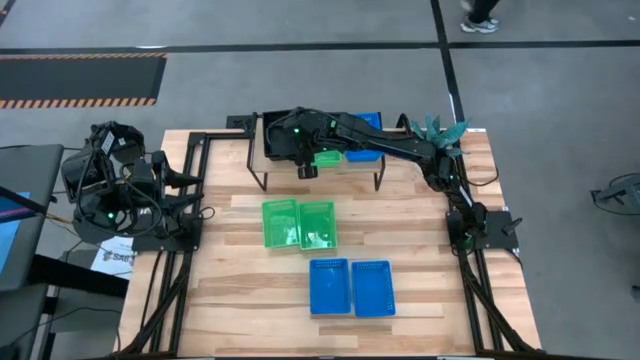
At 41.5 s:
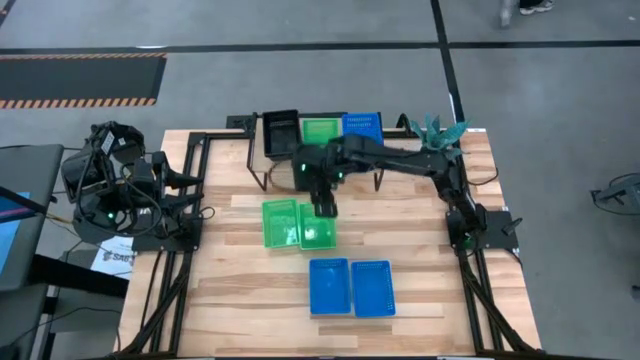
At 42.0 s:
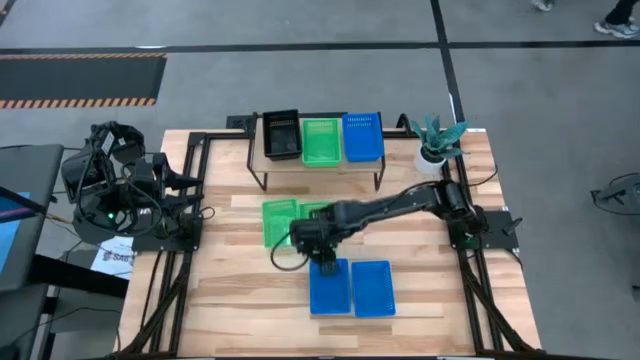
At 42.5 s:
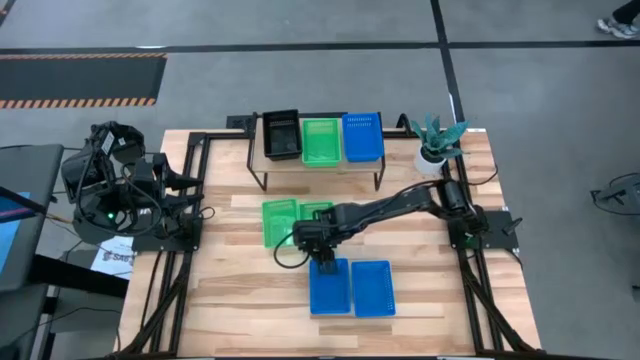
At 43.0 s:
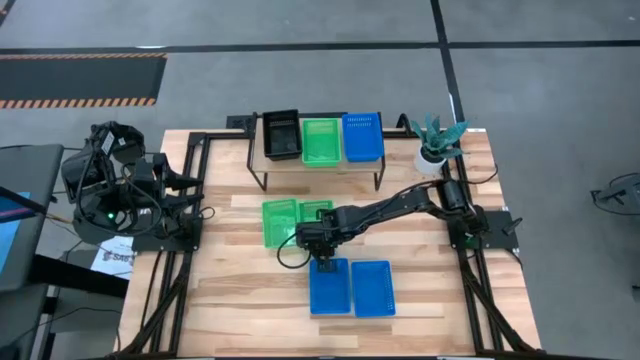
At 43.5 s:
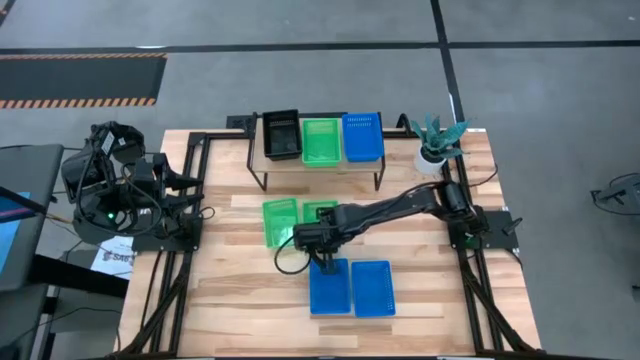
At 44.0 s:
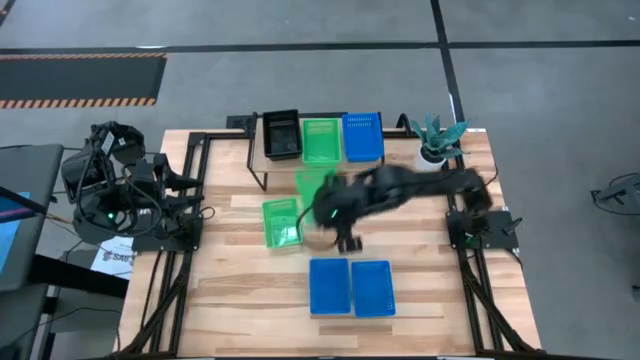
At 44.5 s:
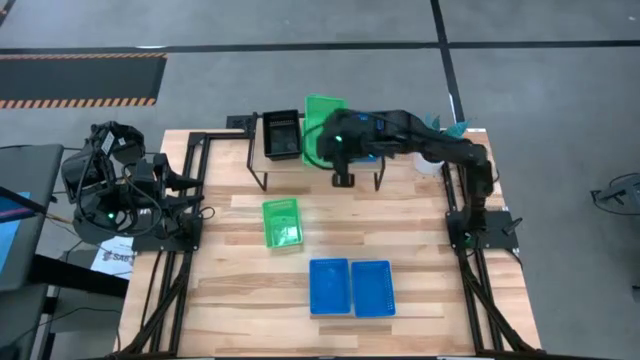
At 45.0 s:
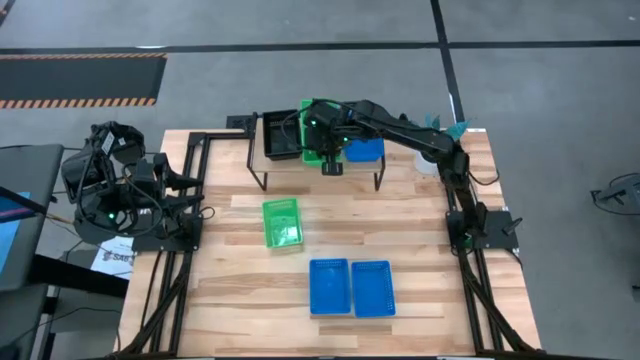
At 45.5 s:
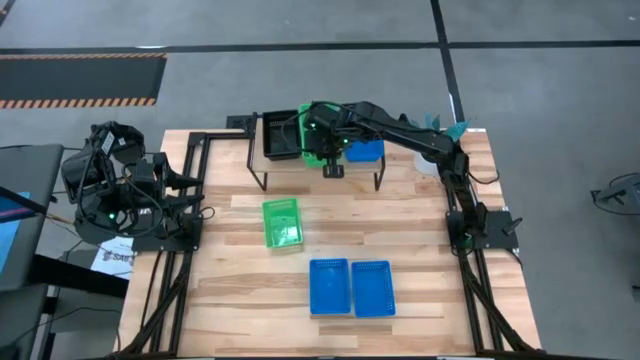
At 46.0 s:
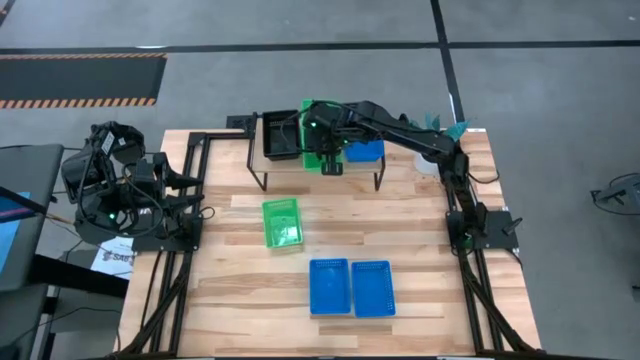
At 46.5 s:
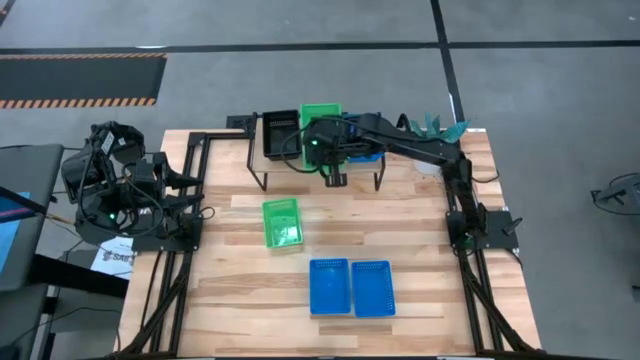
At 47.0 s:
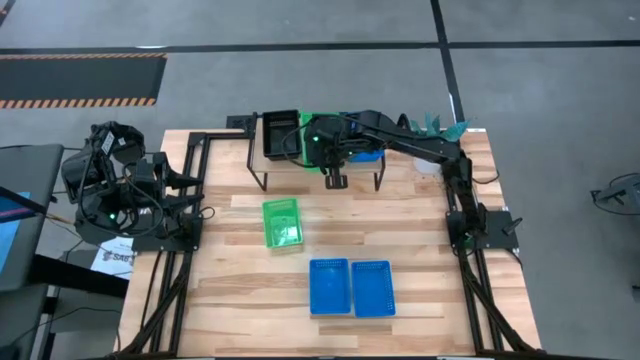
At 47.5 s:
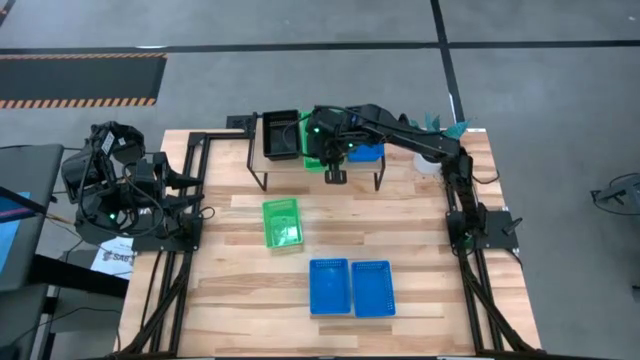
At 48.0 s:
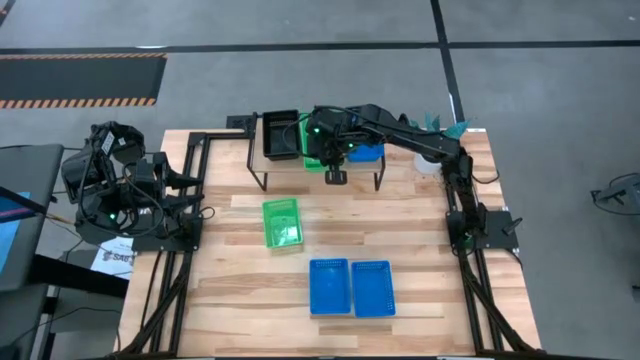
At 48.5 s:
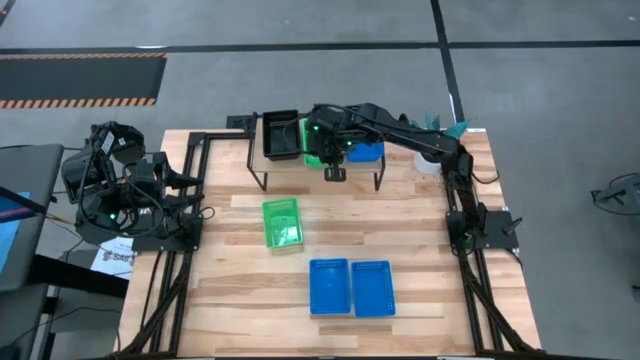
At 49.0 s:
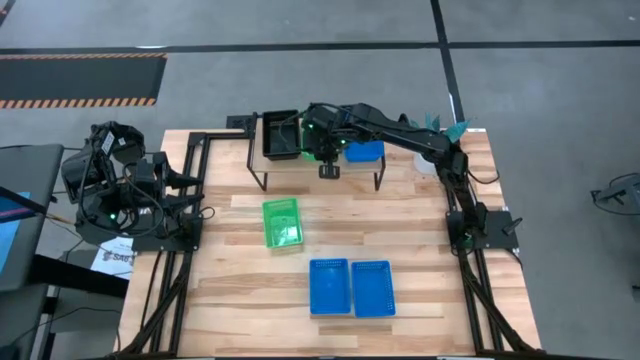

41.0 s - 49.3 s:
Task: Stack baskets on shelf by color
Stack the right green bin on the green bin on the shelf

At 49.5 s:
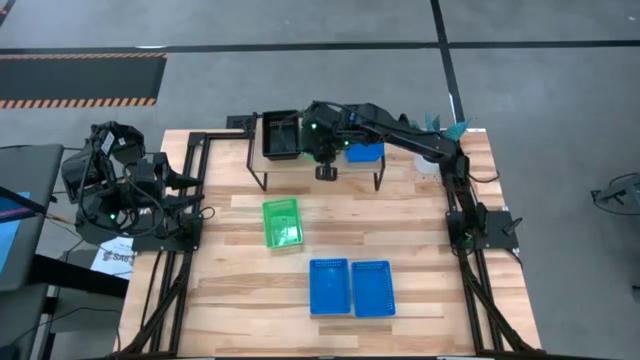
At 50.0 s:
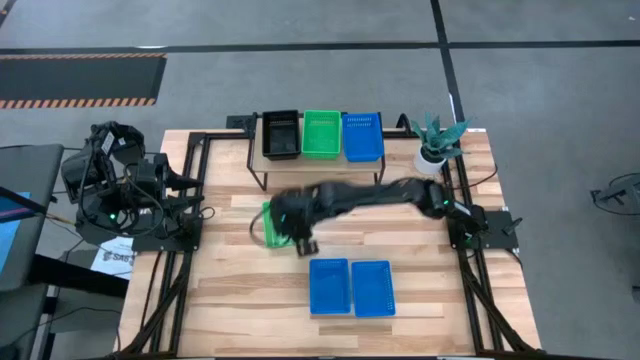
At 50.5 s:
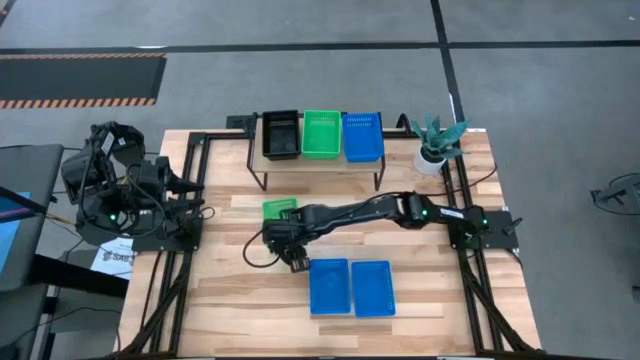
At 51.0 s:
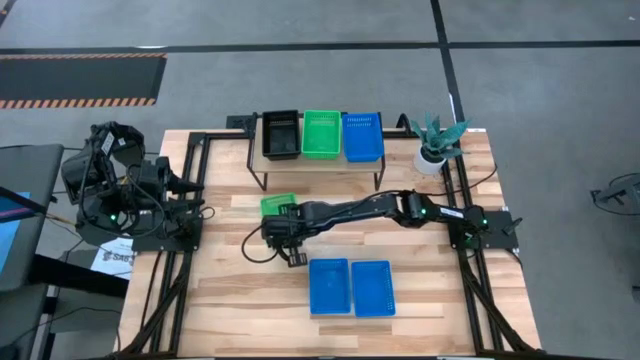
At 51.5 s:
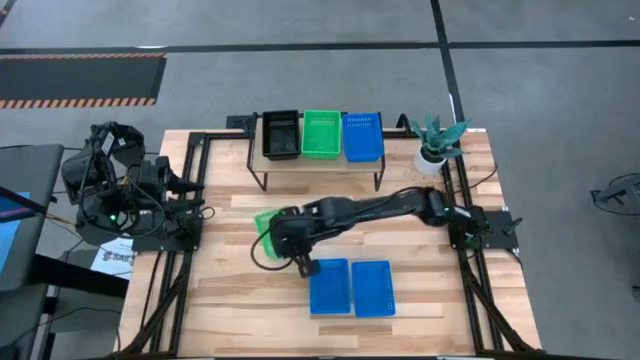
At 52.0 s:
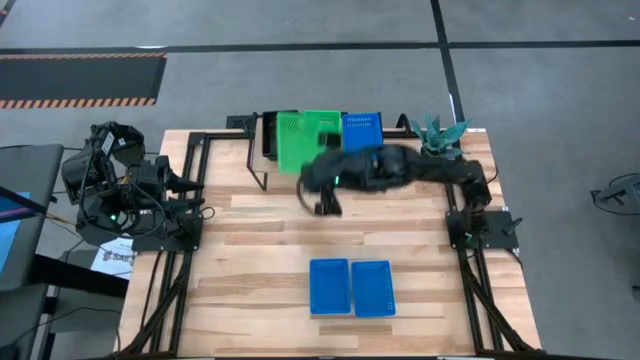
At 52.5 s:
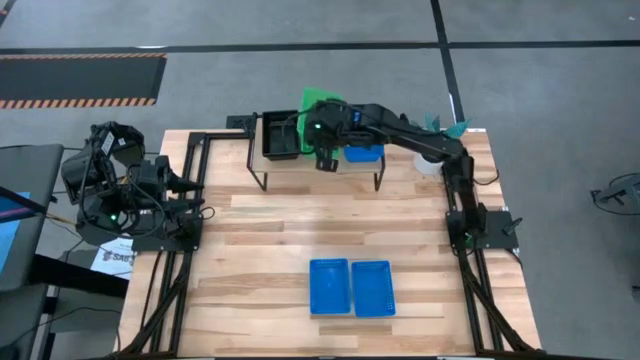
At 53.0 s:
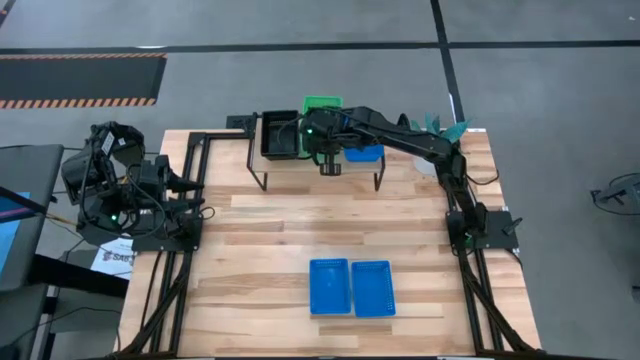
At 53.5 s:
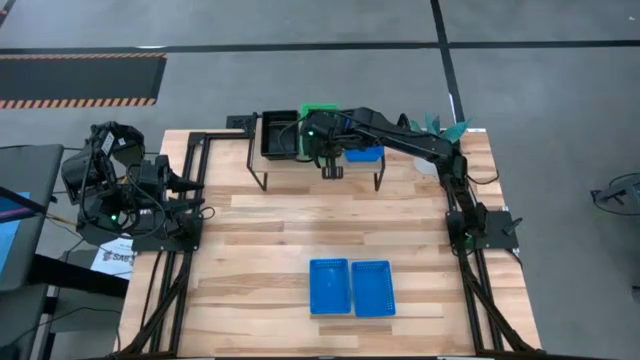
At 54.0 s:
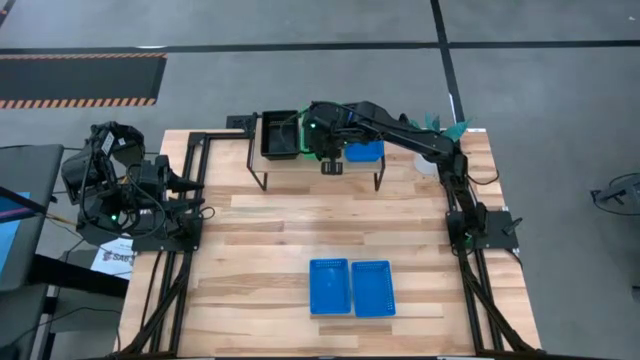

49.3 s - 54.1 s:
Stack the green bin on the green bin on the shelf

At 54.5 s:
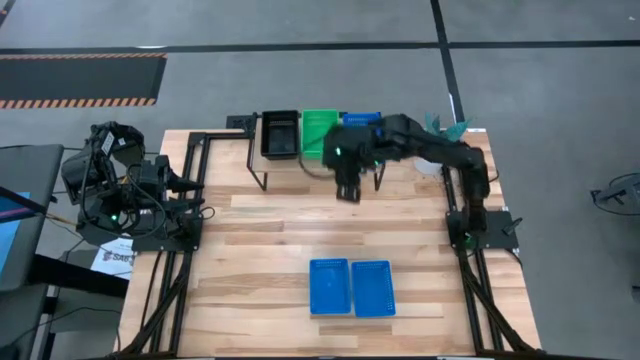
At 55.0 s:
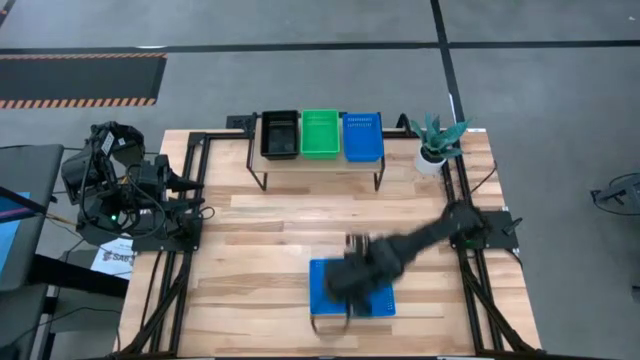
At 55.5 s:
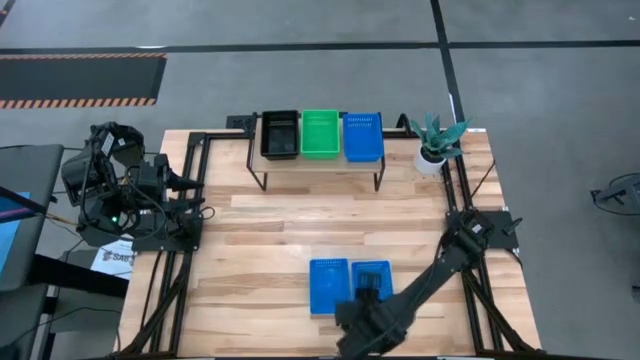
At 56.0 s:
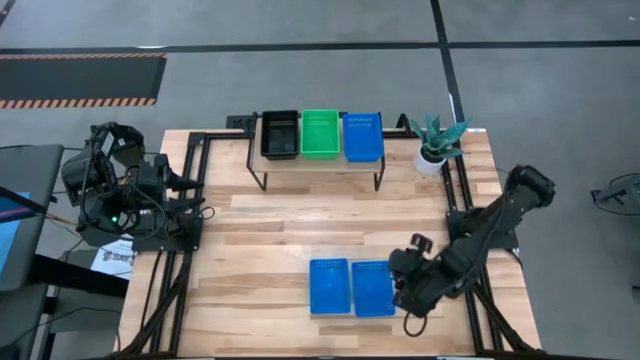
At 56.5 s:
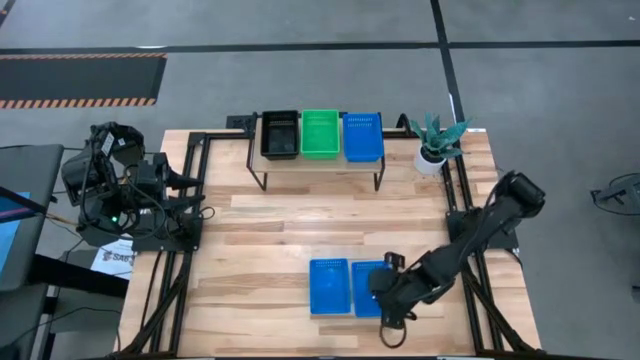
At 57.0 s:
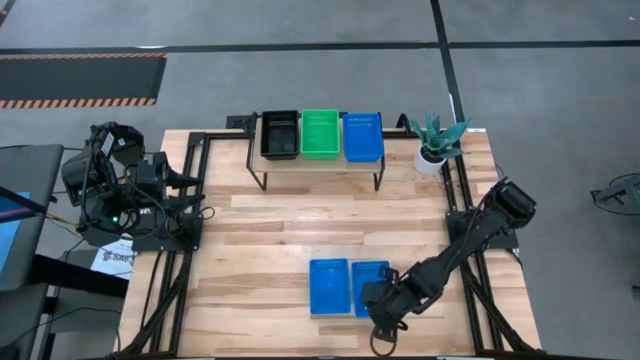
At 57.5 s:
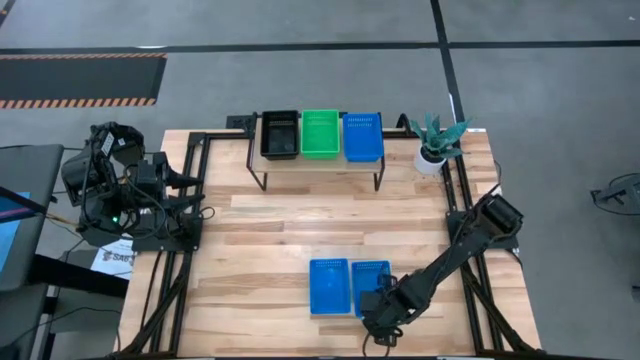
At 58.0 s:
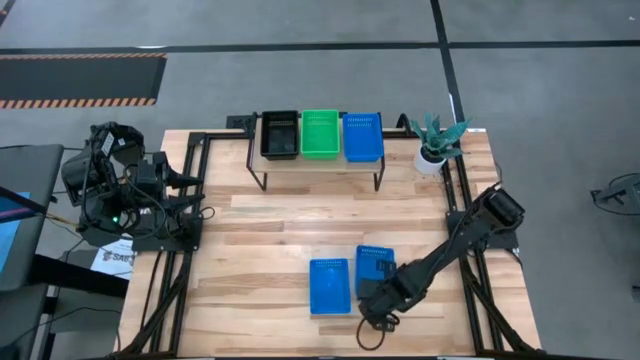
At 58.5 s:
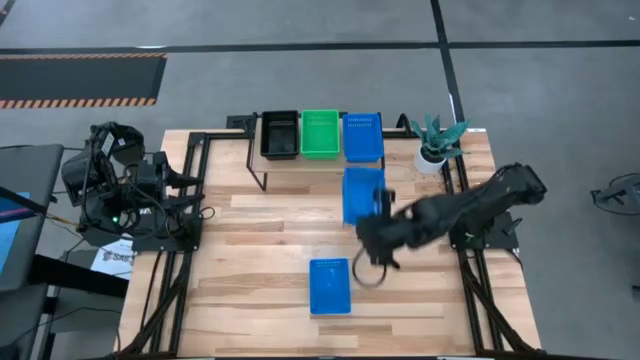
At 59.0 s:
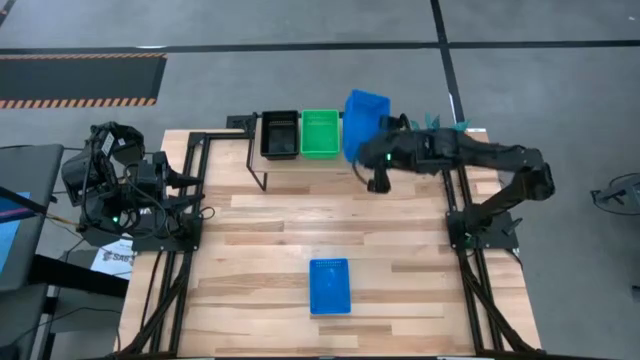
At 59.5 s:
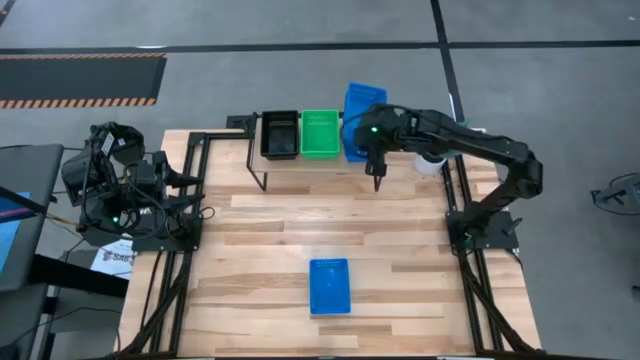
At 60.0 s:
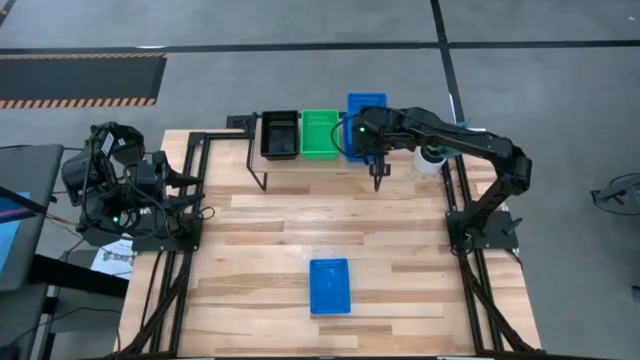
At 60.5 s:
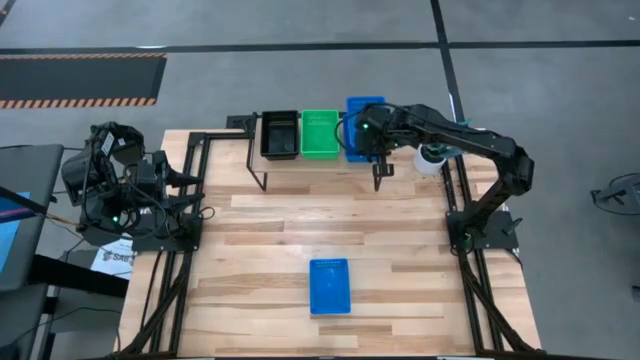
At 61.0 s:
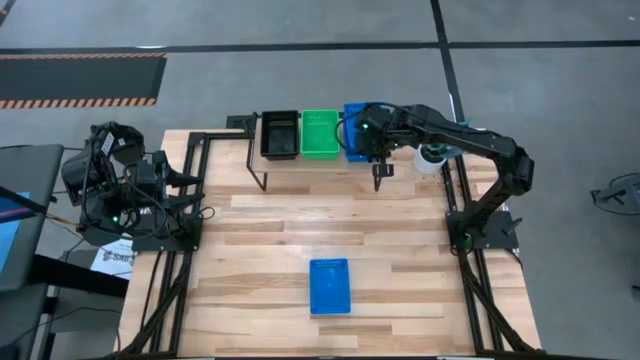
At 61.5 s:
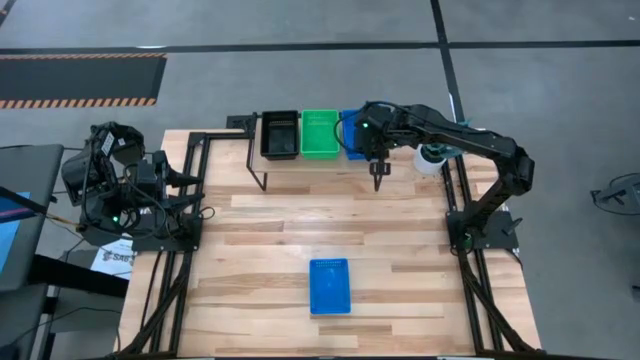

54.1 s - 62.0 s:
Stack the right blue bin on the blue bin on the shelf
